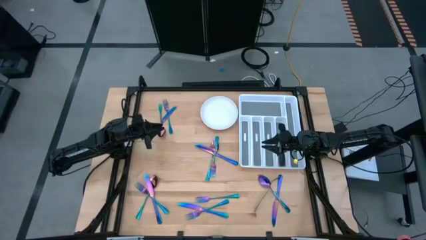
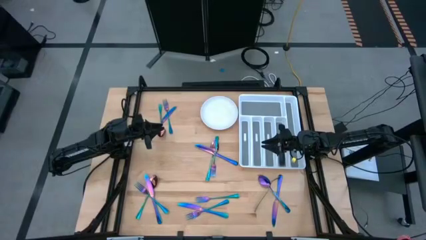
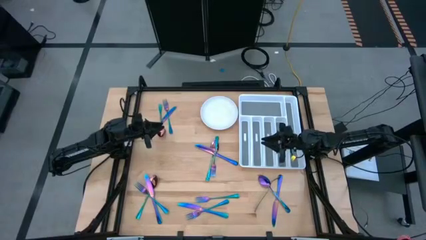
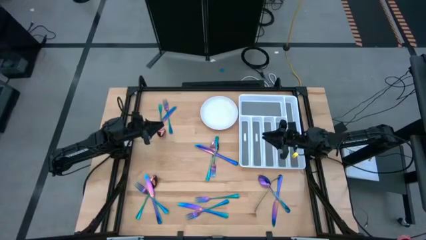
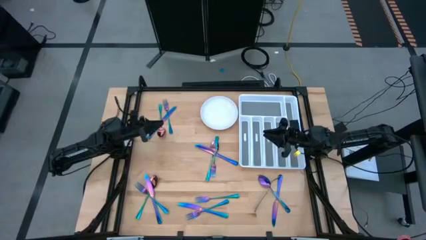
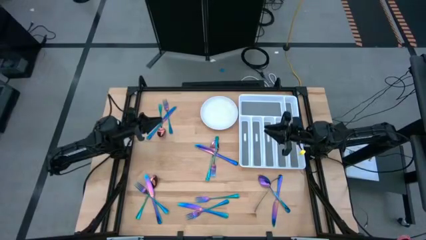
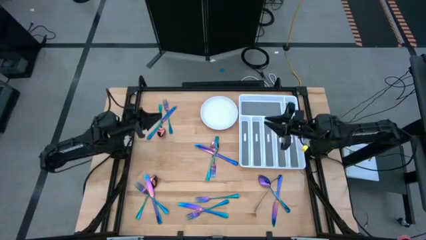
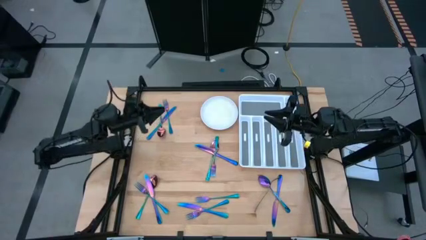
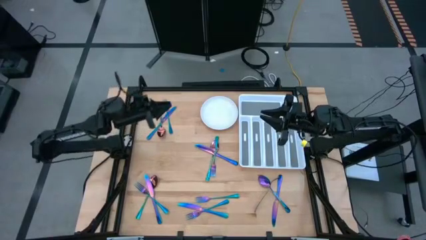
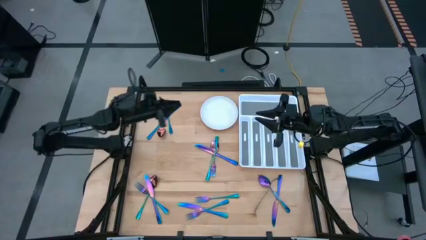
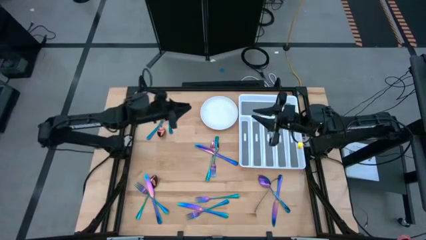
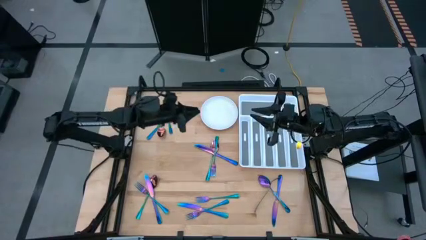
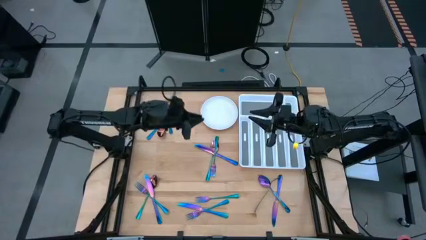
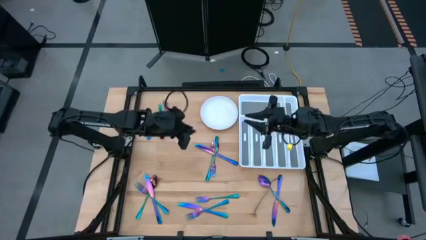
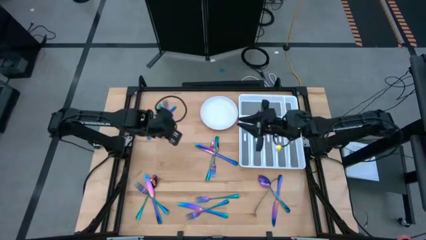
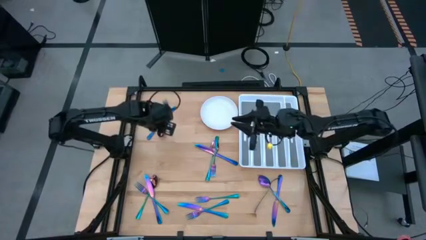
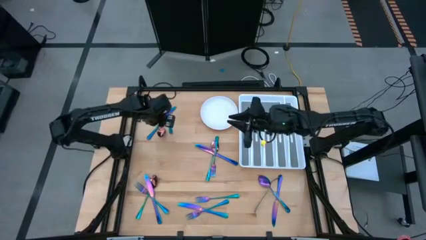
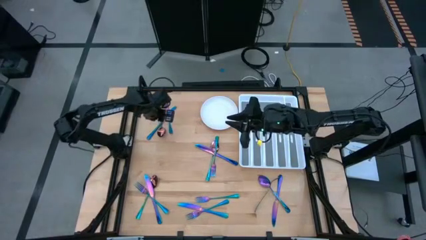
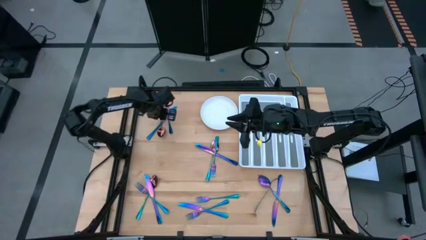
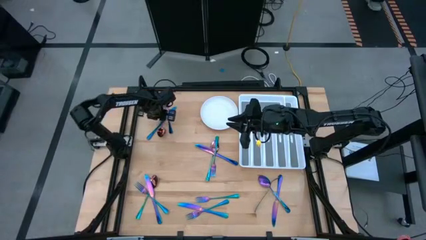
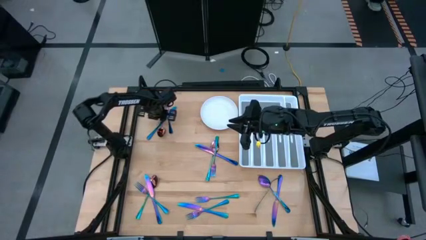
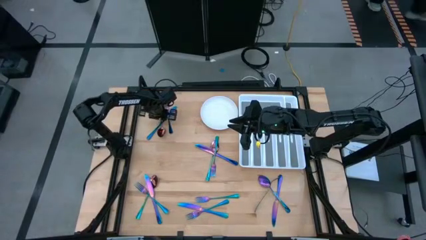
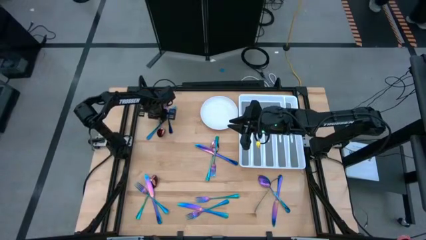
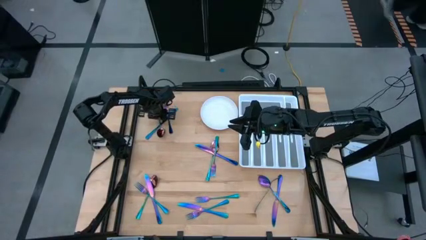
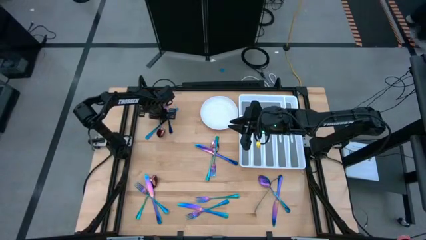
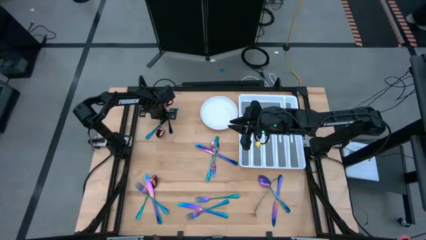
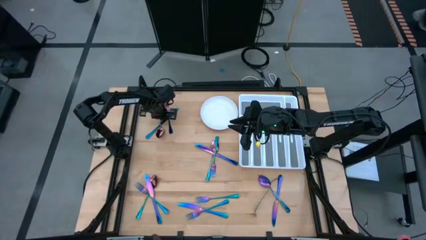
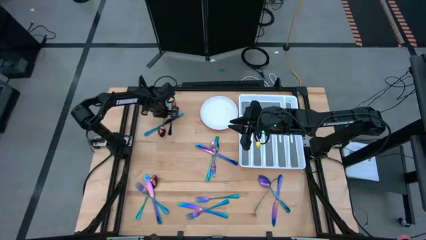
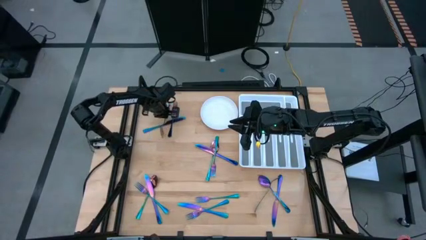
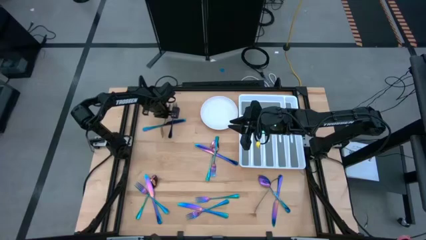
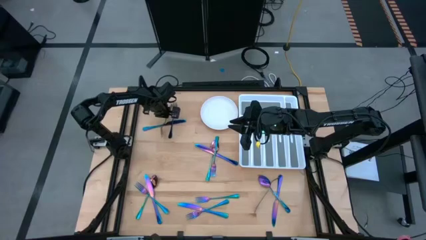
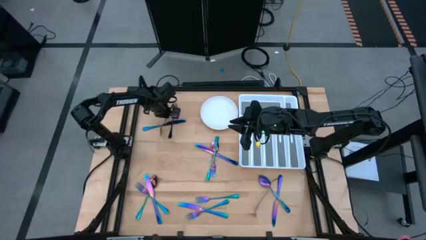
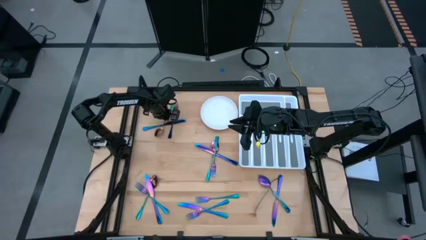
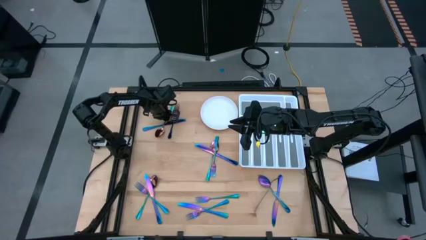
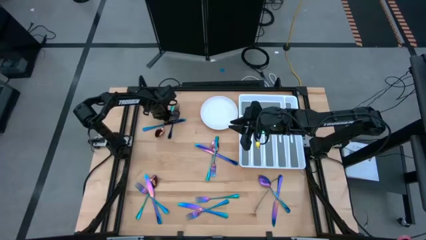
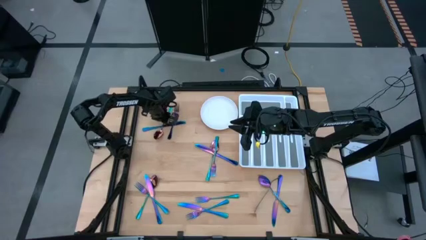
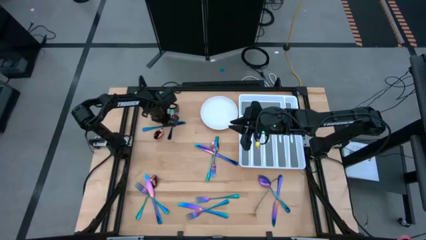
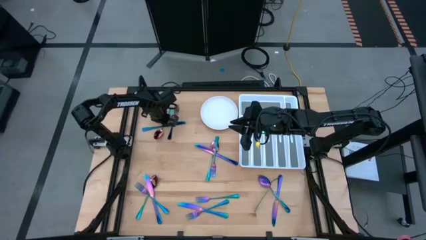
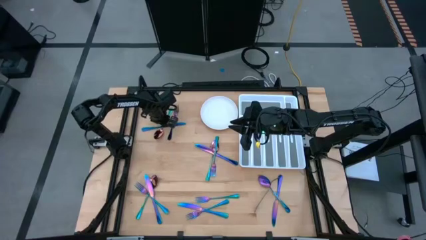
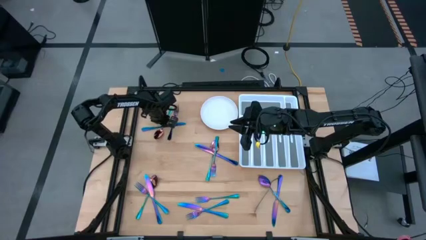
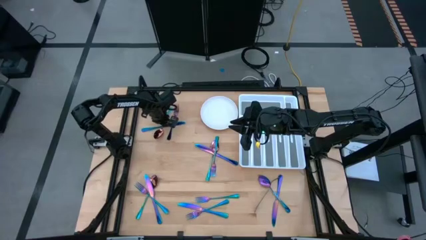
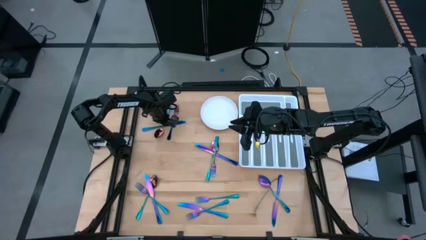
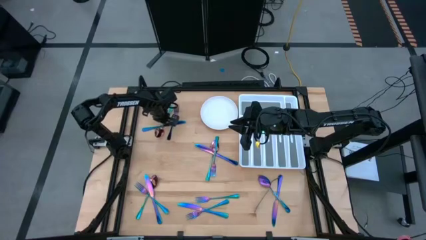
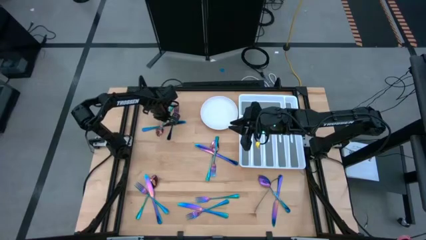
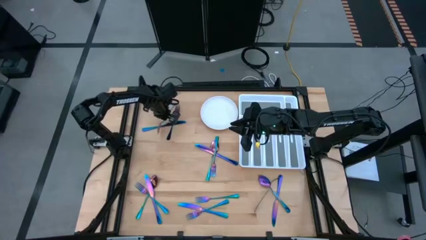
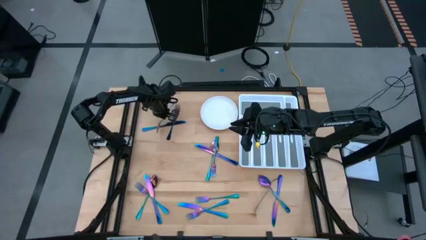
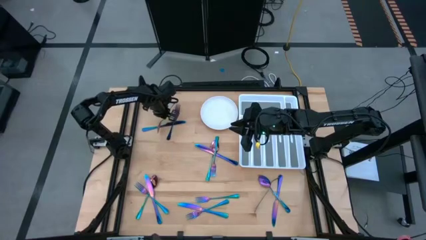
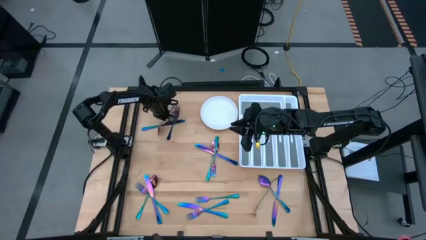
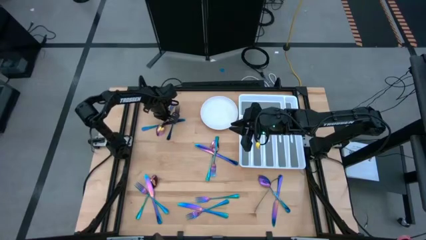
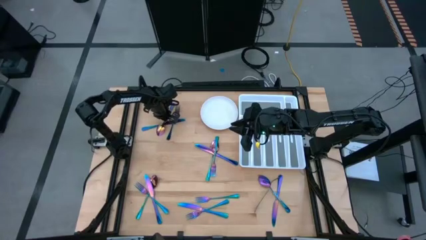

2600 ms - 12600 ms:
Task: Sort silverware
Put the purple spoon into the white silverware tray
